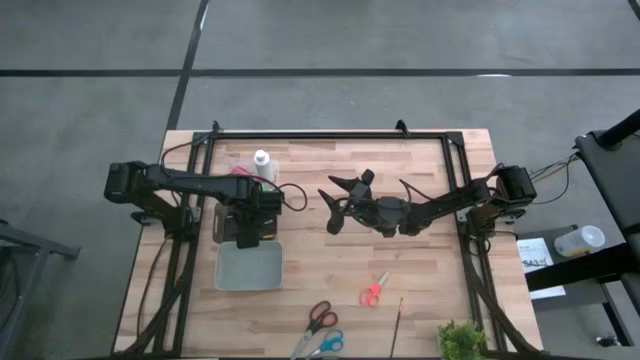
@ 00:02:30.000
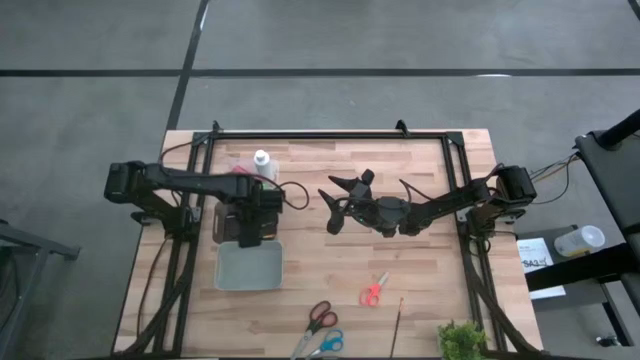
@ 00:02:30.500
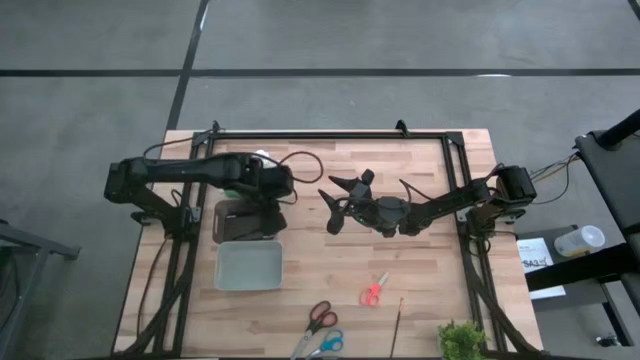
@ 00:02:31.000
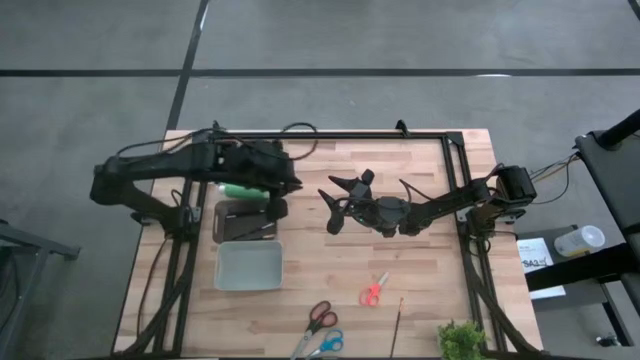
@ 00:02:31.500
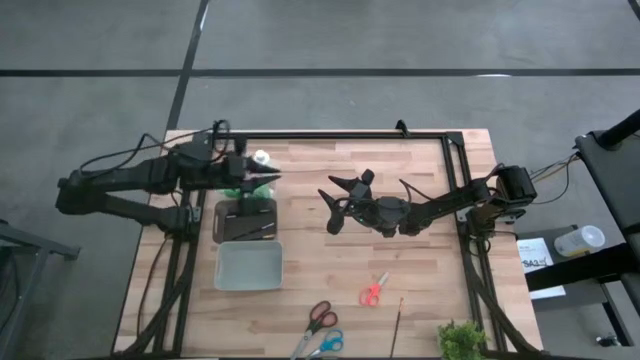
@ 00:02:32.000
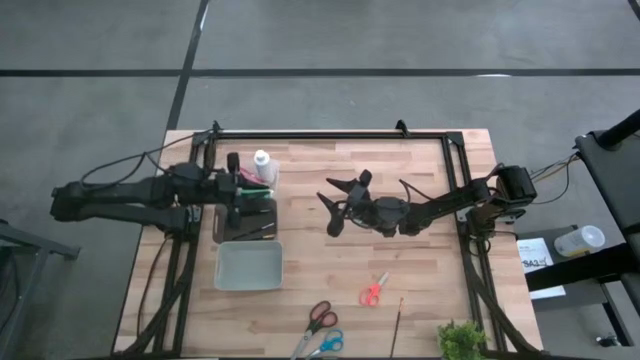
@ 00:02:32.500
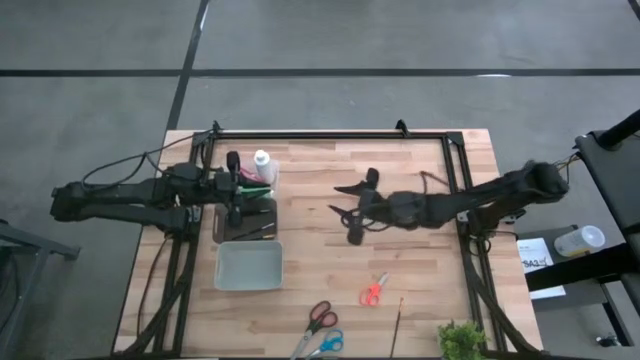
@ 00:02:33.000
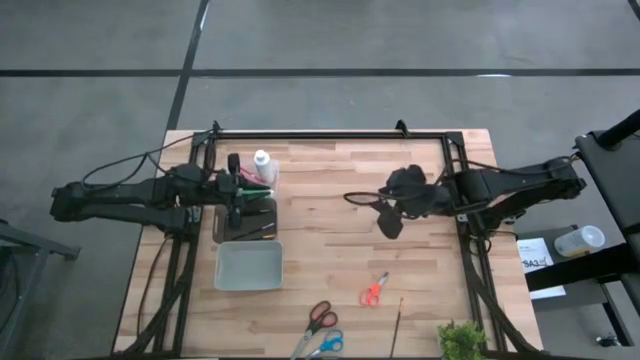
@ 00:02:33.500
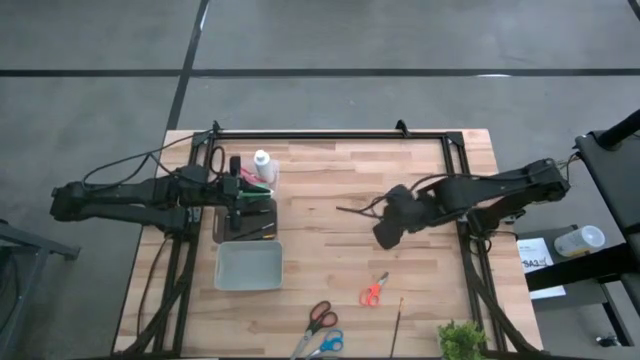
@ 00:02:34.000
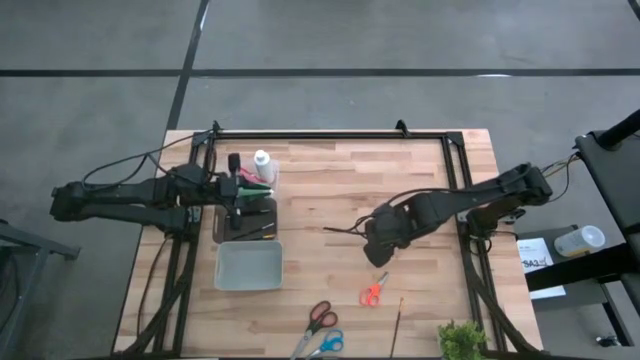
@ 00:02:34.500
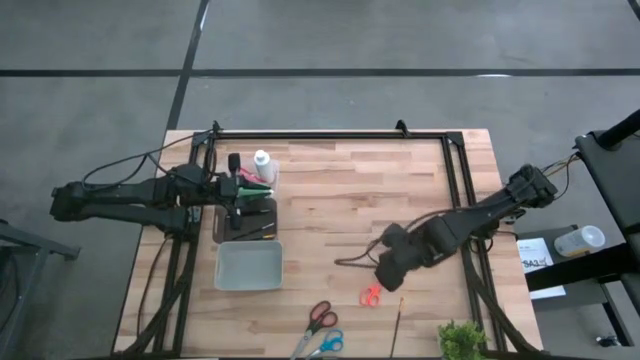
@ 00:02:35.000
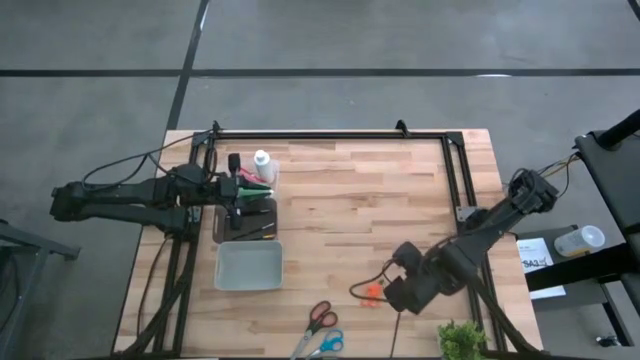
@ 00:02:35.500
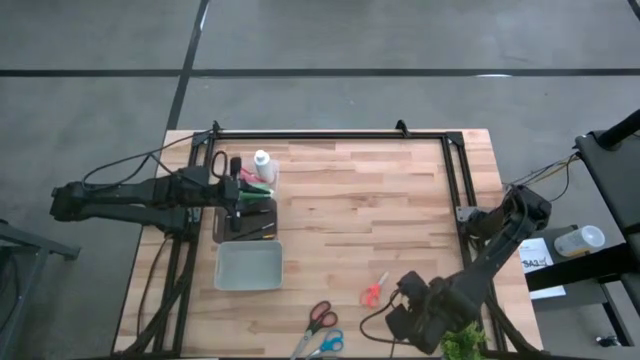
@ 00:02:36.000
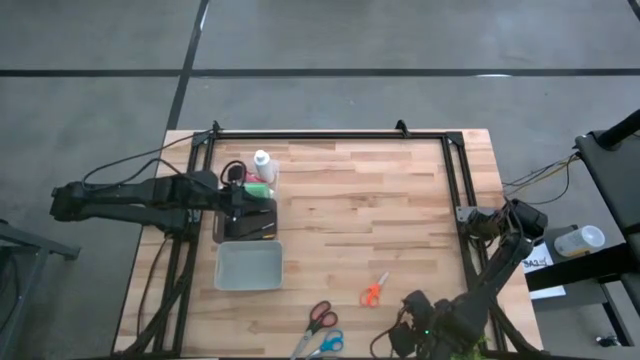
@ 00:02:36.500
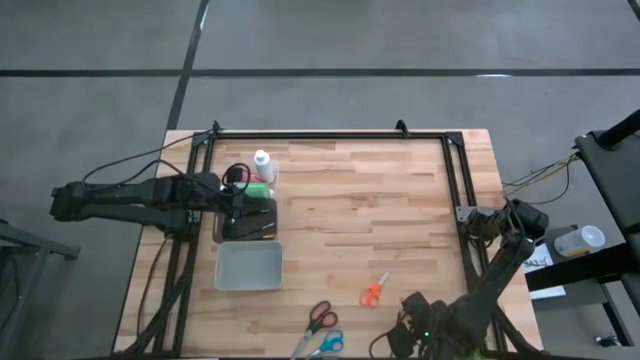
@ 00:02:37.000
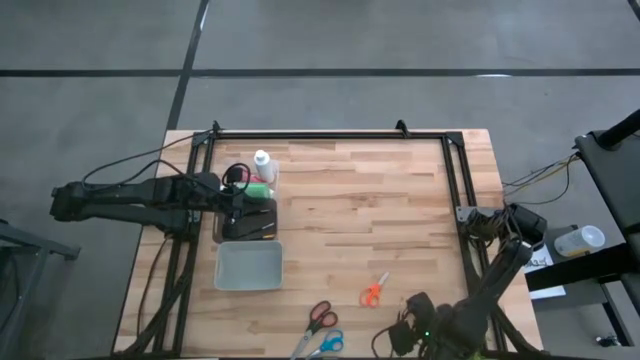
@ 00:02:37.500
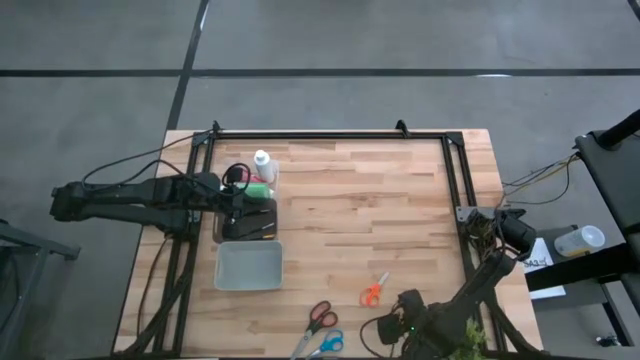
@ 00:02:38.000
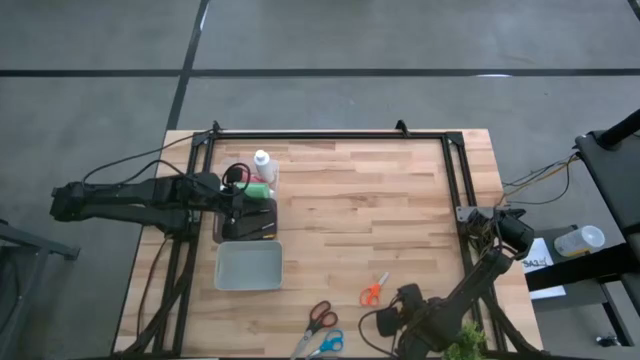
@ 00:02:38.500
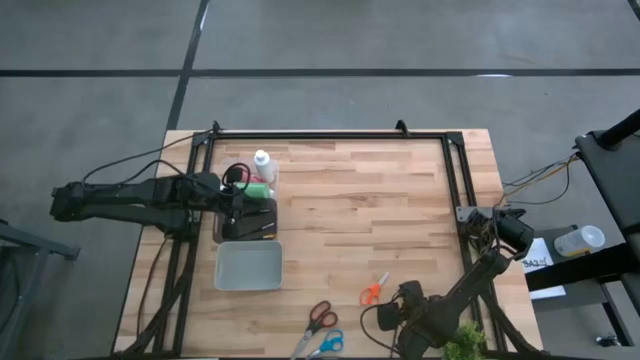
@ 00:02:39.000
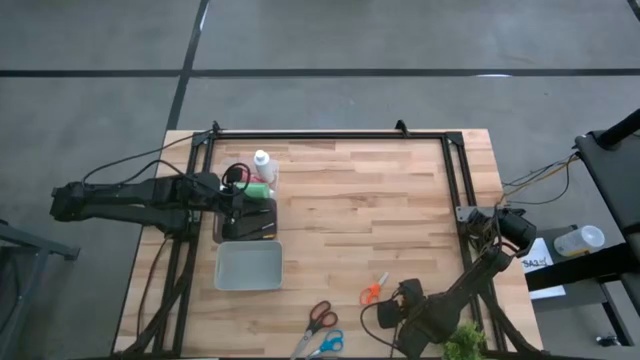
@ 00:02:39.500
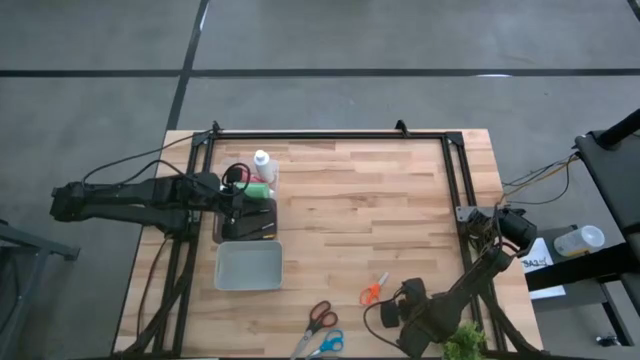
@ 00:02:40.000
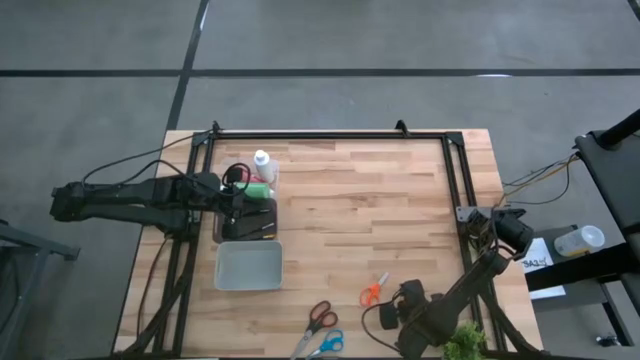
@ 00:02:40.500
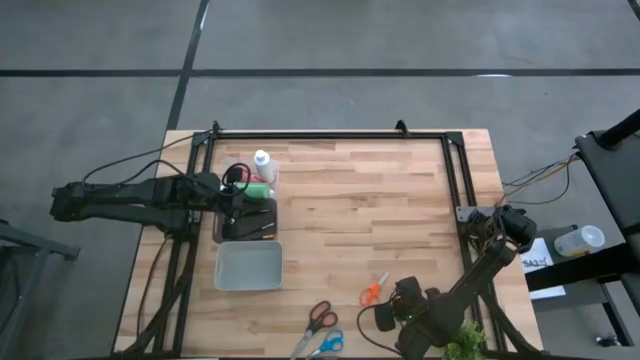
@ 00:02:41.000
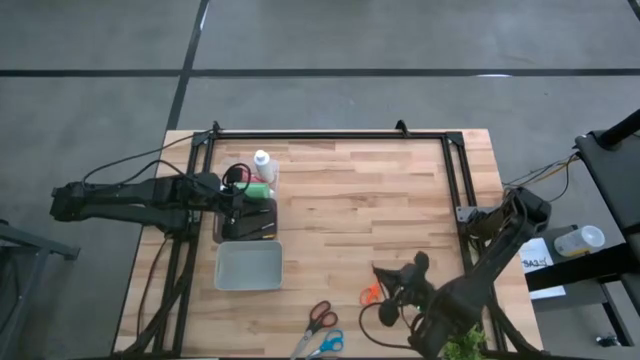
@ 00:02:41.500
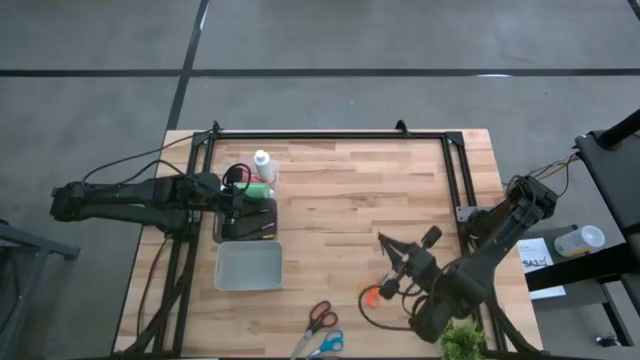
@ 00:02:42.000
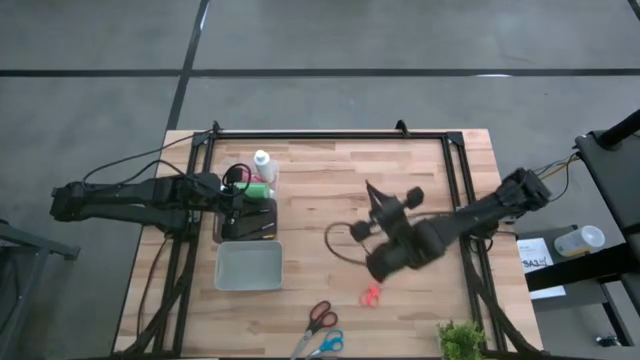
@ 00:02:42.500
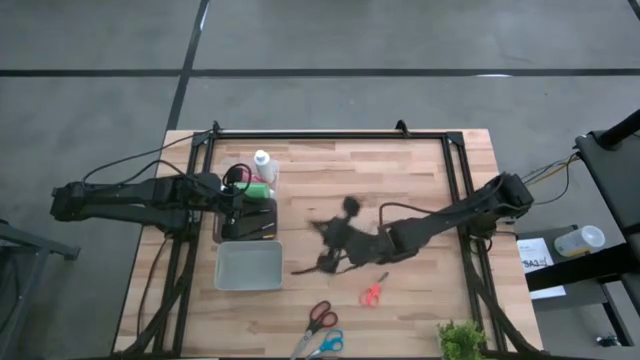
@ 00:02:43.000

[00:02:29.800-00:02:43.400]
Task: Pick & Place Paint Supplies
Put the orange paint brush into the black bin

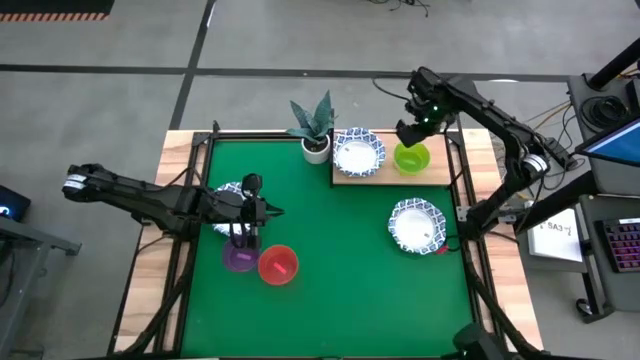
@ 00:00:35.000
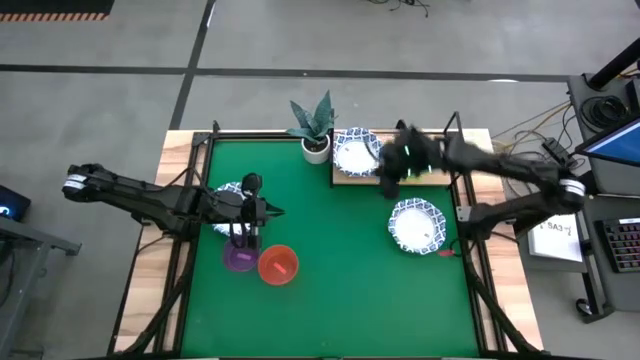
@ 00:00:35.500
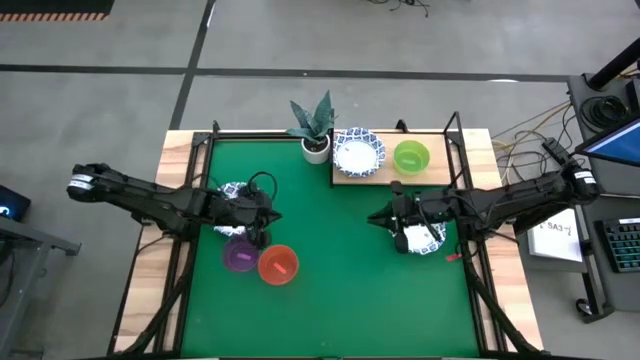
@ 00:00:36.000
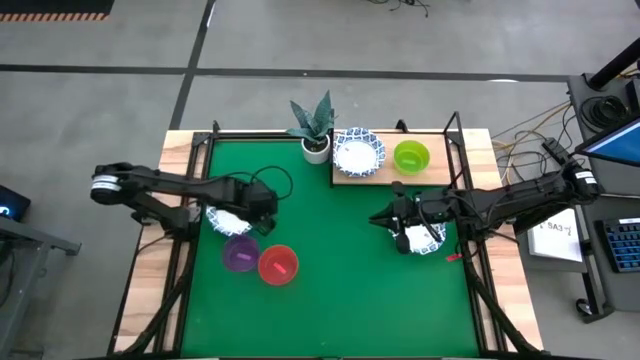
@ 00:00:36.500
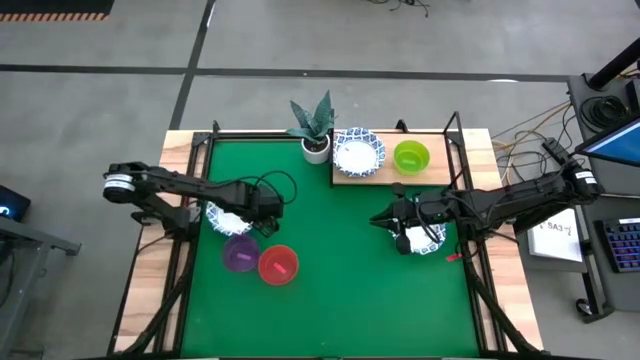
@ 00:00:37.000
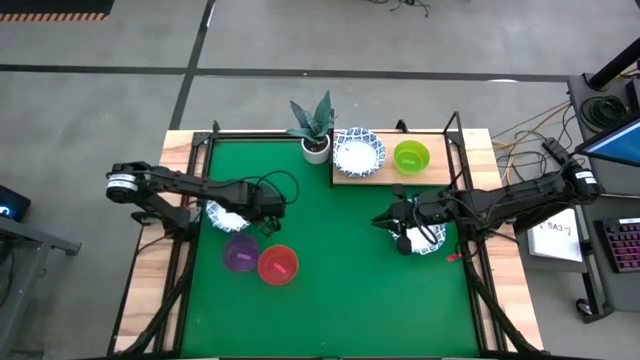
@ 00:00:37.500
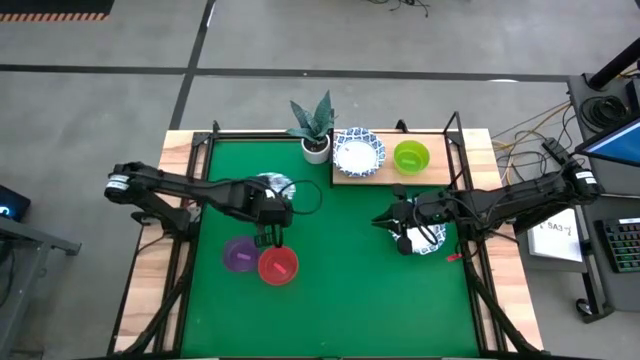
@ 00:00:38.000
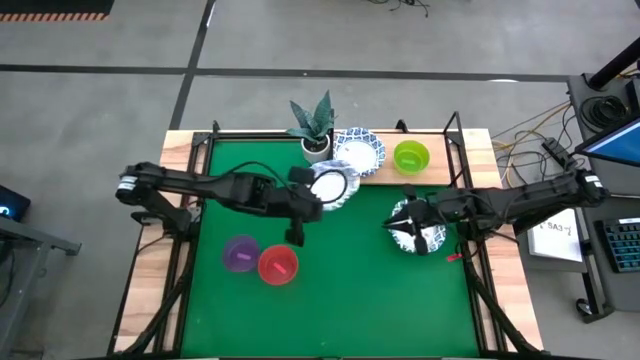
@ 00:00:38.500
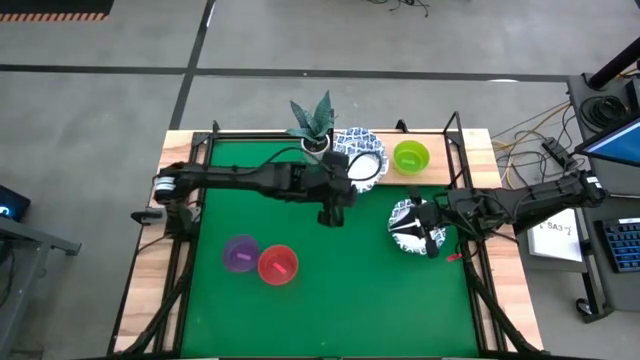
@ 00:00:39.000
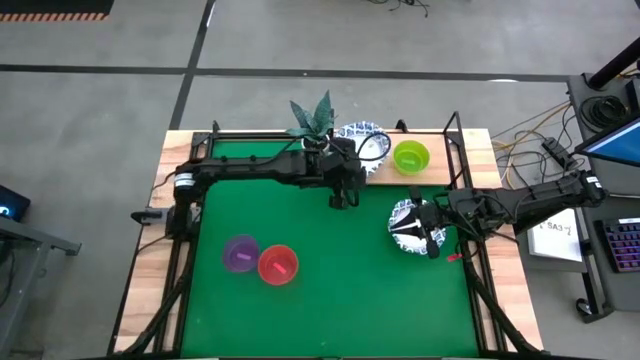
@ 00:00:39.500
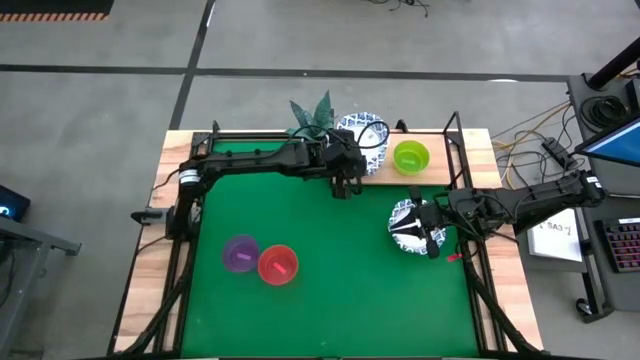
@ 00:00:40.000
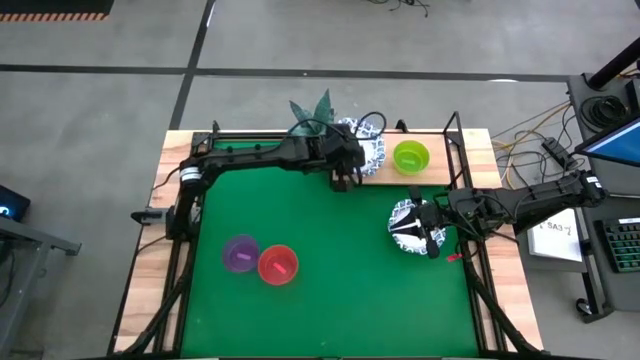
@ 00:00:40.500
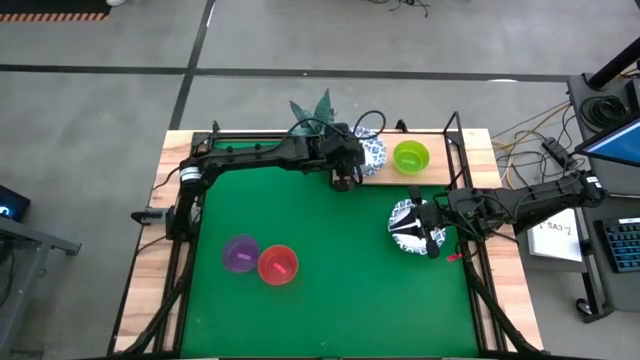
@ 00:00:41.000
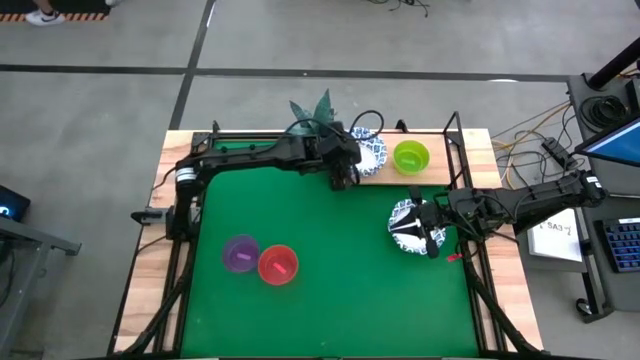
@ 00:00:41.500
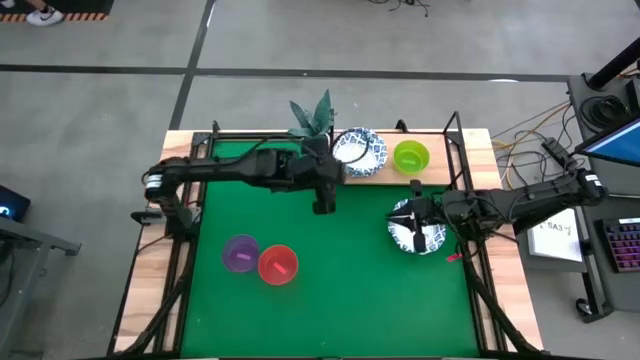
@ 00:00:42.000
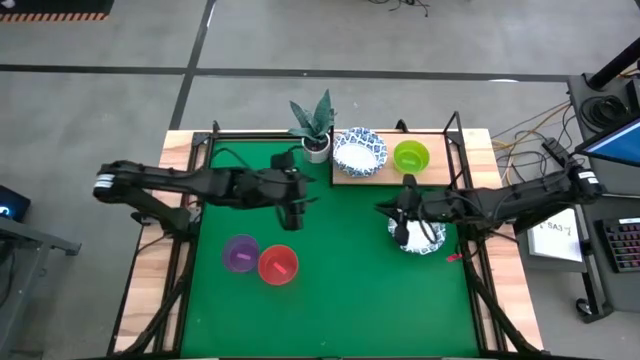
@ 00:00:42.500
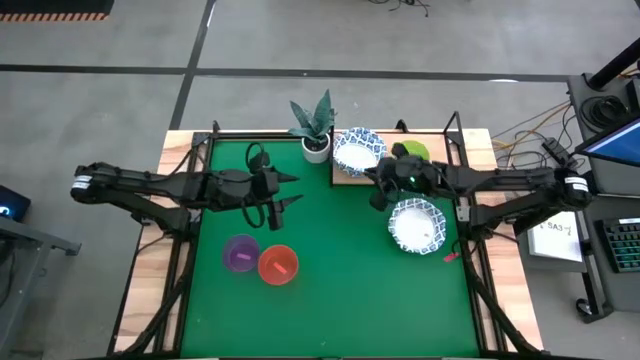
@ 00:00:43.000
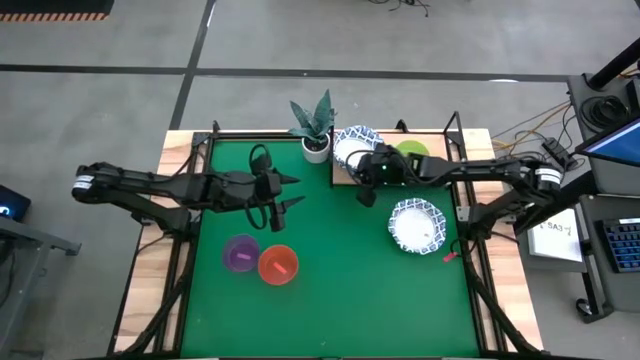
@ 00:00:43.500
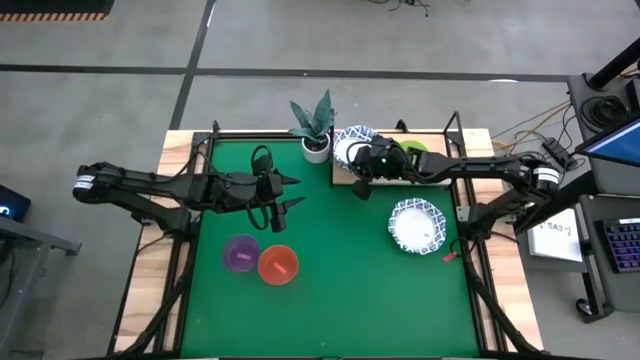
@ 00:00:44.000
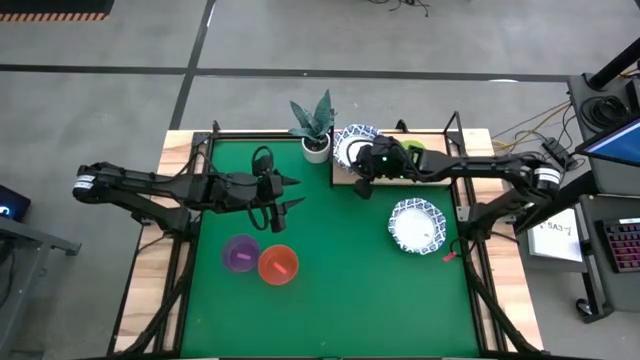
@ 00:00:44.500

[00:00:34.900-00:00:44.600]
Task: Place and stack bowls onto a shelf
Stack the white and blue bowl on top of the white and blue bowl
